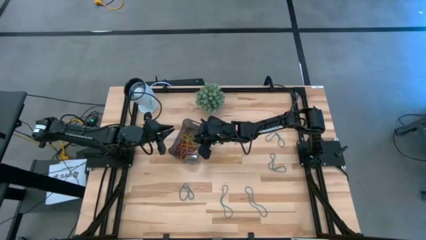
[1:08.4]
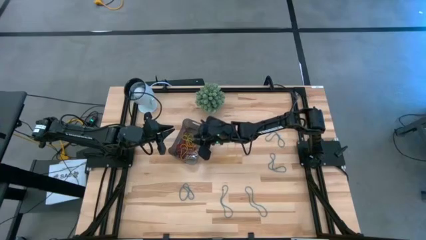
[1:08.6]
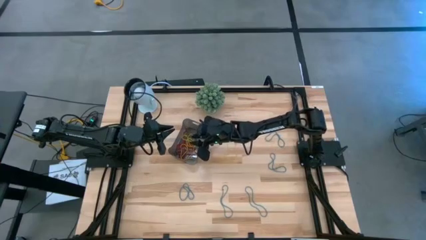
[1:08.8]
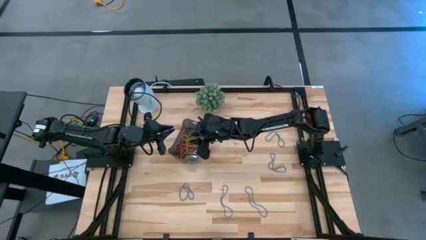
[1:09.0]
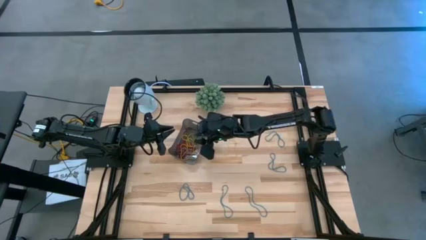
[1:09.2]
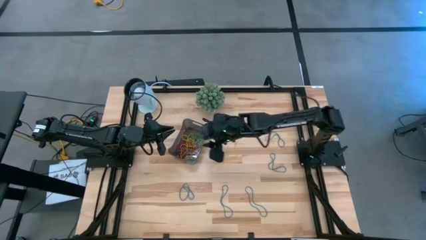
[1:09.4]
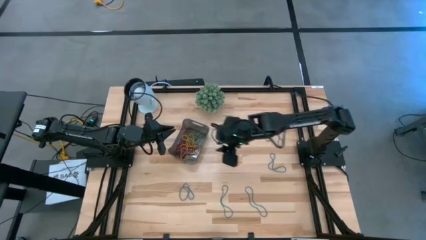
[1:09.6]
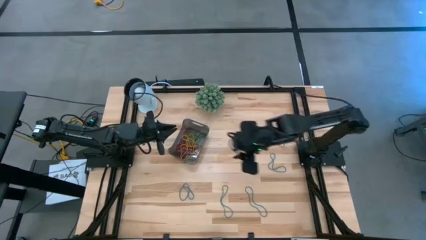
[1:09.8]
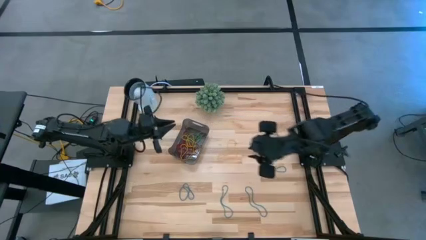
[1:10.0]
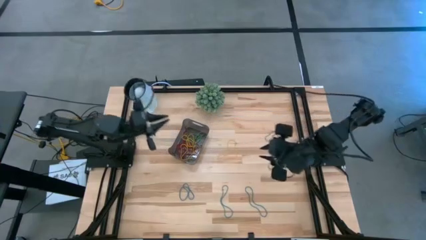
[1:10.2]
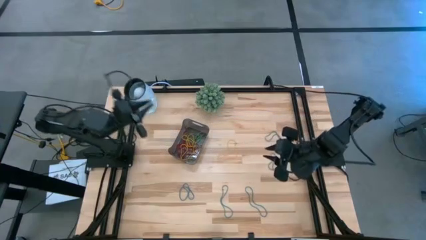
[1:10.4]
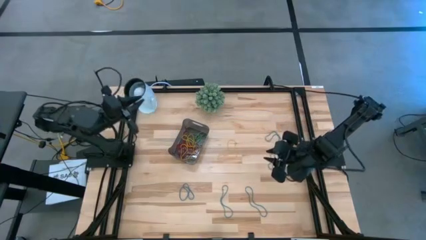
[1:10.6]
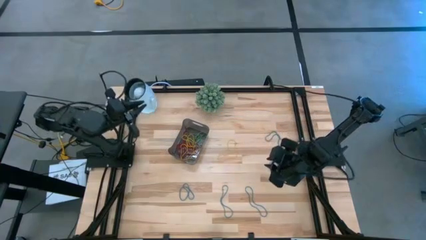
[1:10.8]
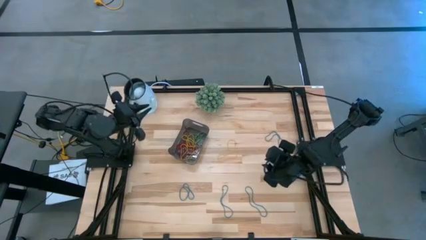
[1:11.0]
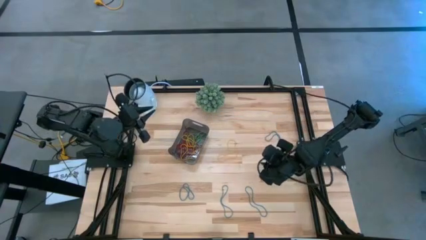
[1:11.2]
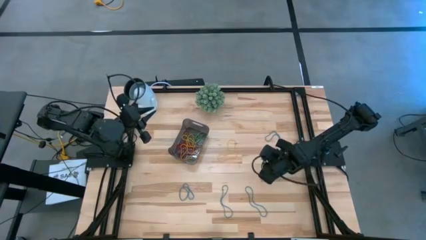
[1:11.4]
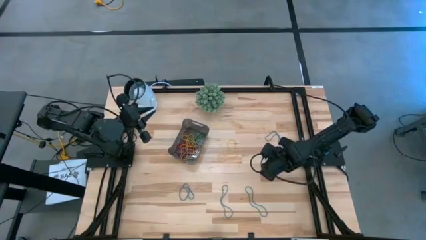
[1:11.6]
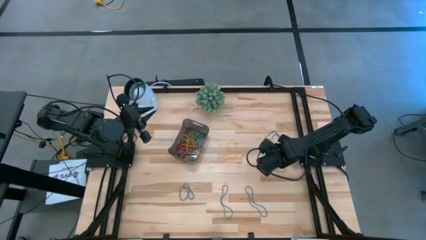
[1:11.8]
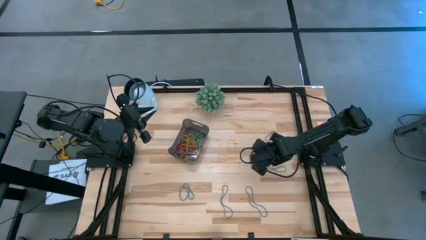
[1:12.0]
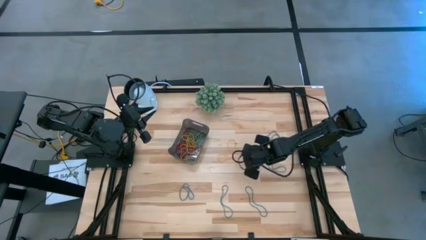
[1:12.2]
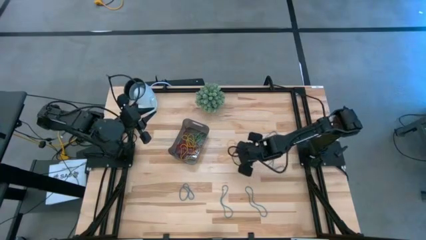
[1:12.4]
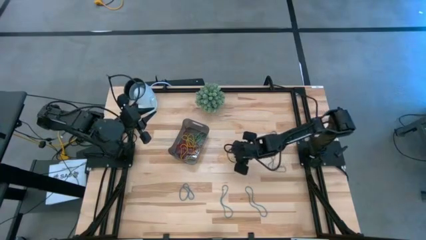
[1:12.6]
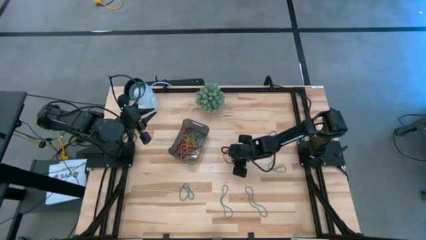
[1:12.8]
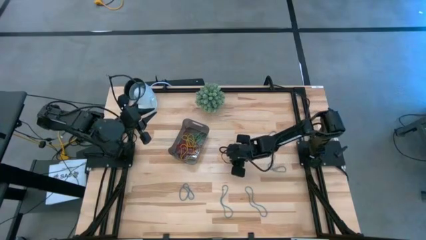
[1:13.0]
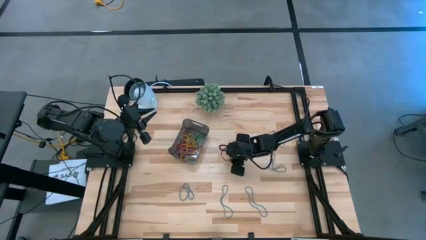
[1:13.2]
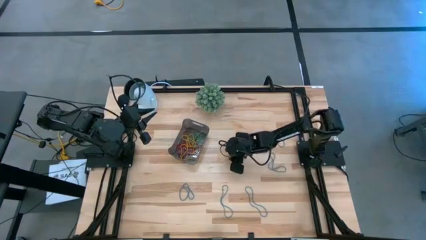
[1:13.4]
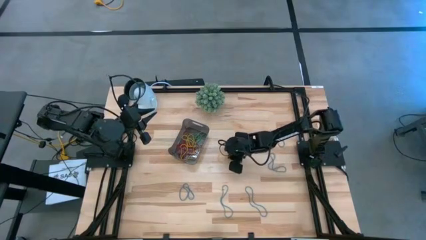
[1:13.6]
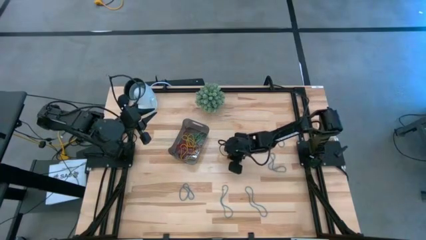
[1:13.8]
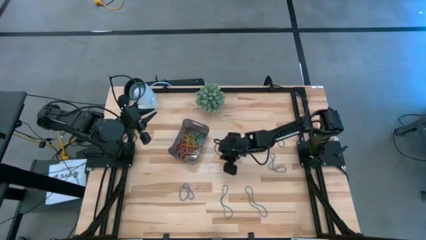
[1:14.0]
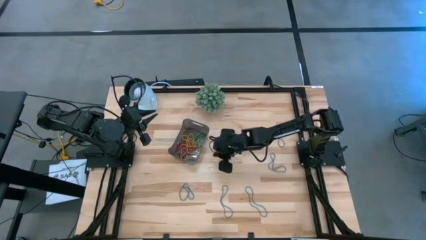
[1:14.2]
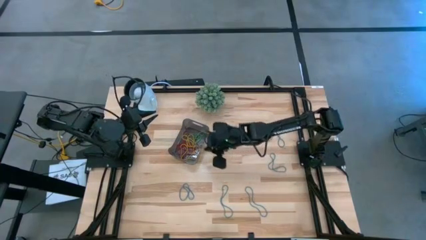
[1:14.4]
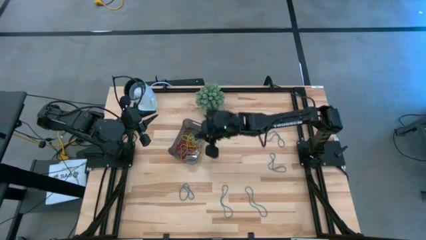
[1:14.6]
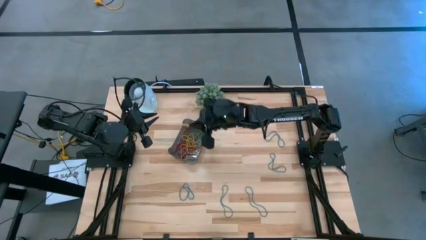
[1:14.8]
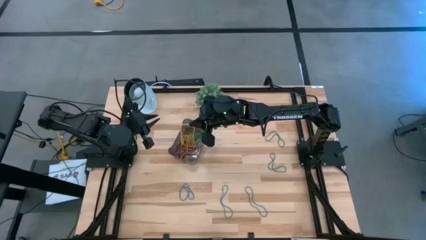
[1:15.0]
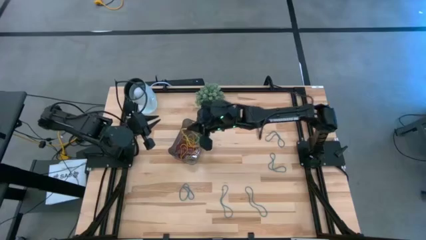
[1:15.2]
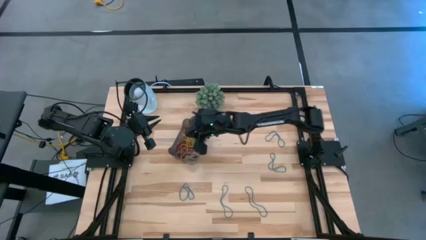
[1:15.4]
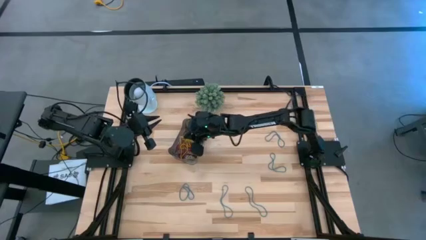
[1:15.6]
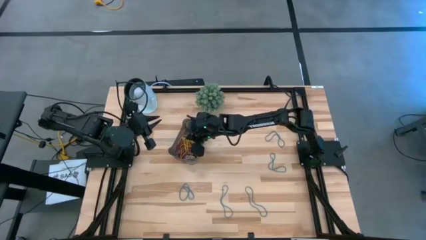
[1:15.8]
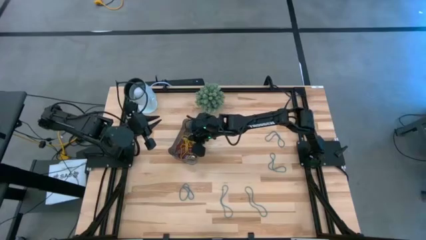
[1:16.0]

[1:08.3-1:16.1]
Task: Pick and place items into bin
Put the yellow rubber band into the black bin

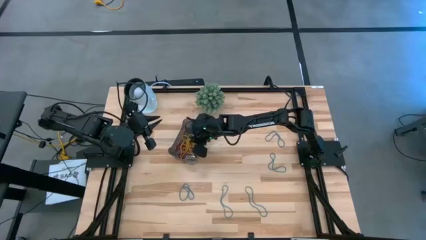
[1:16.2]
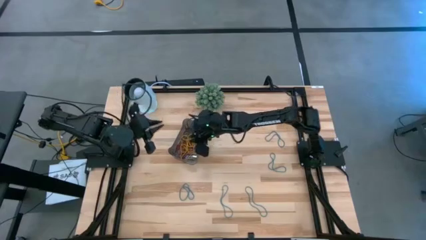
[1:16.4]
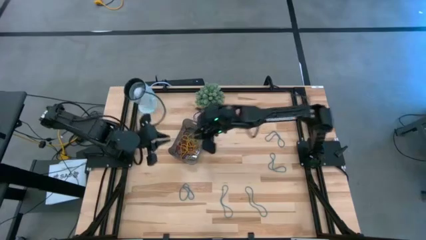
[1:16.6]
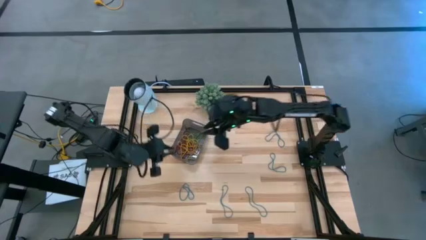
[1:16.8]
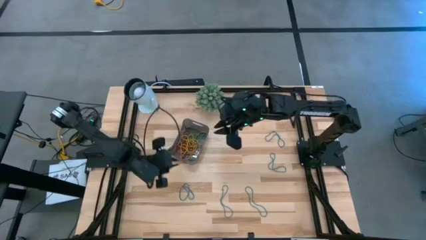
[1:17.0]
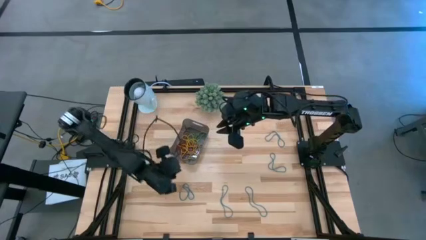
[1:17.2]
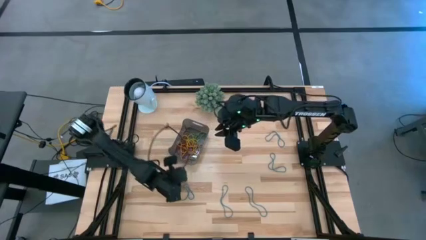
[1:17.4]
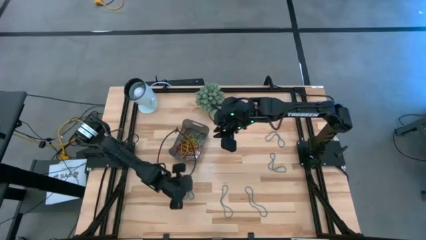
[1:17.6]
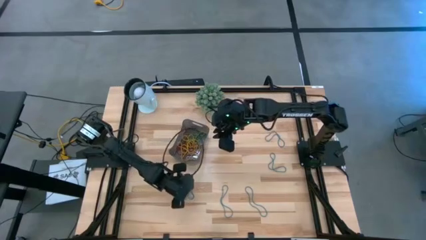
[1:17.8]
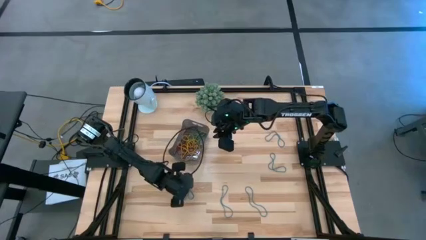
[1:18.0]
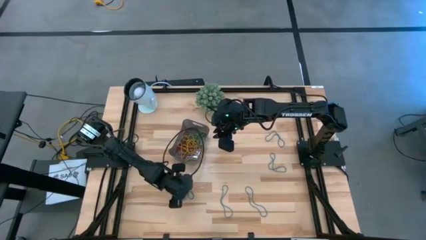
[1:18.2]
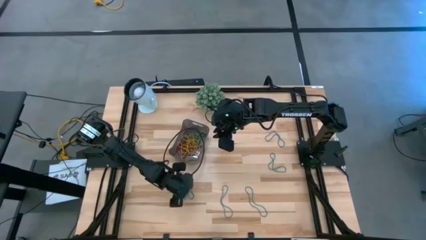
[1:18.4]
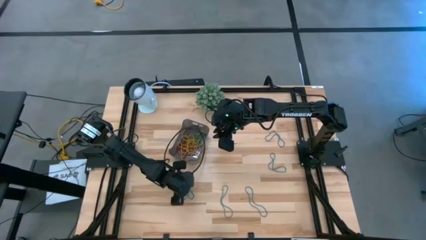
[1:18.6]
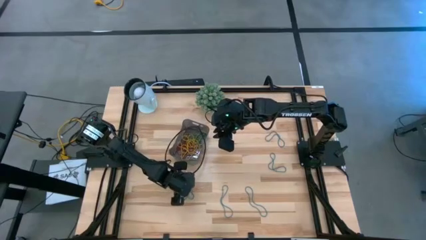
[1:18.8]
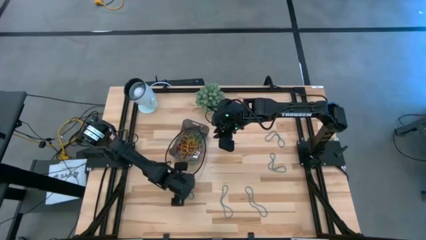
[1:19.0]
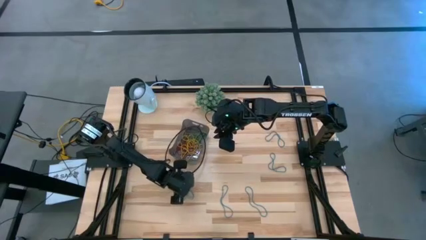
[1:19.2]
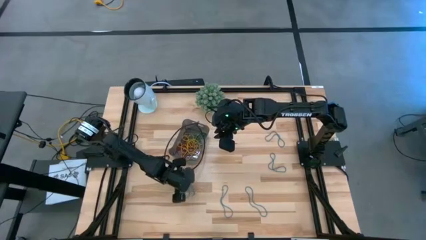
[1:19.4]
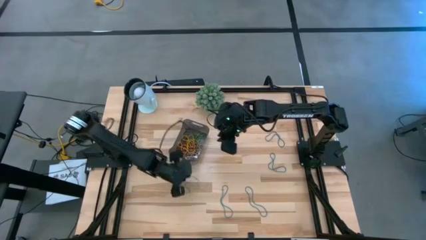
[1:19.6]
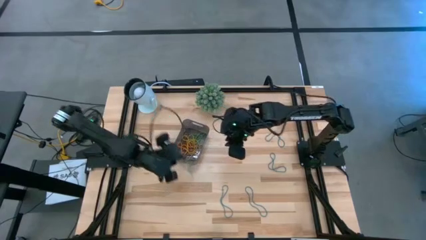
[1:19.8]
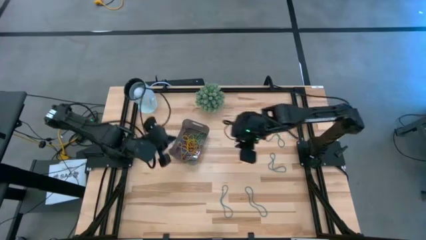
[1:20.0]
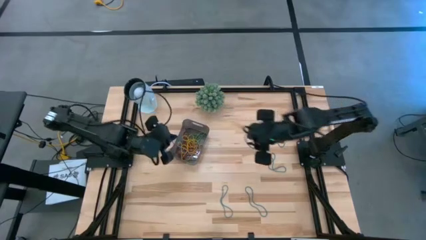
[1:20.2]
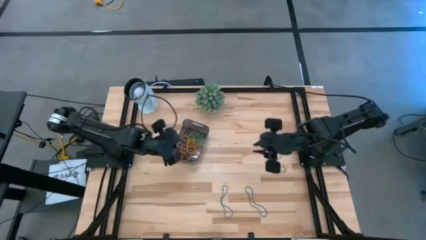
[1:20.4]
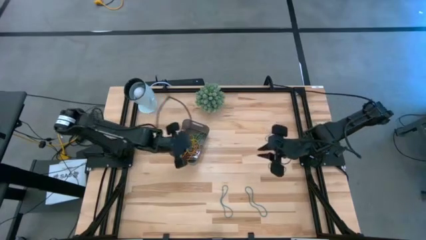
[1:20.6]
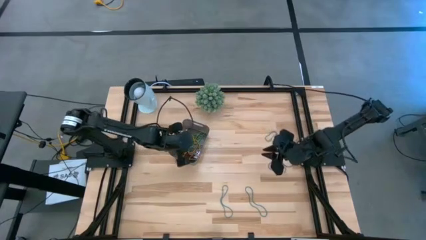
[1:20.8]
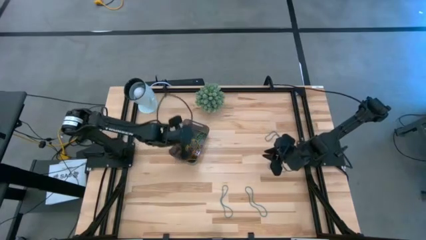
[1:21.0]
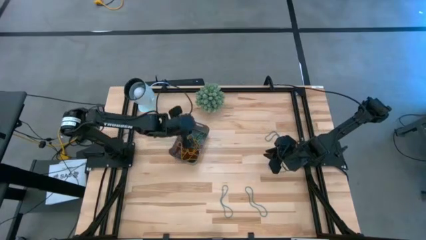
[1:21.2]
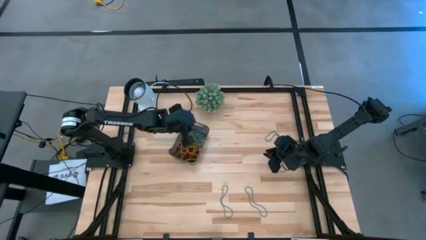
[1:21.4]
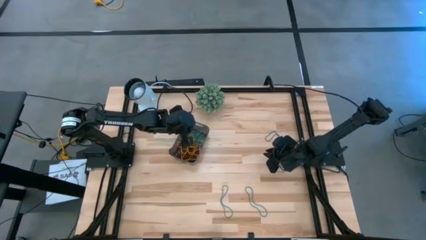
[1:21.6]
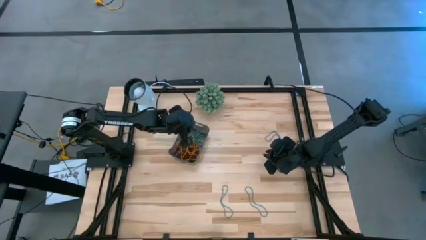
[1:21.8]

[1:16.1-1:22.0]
Put the blue rubber band into the black bin

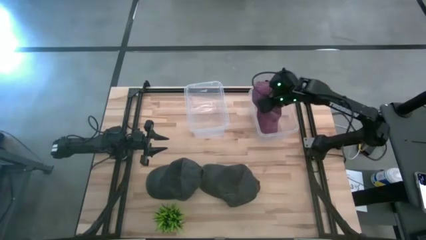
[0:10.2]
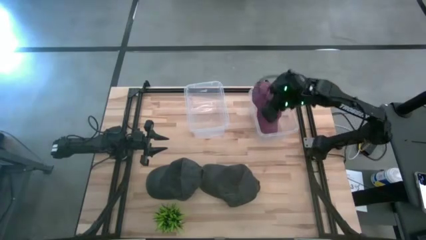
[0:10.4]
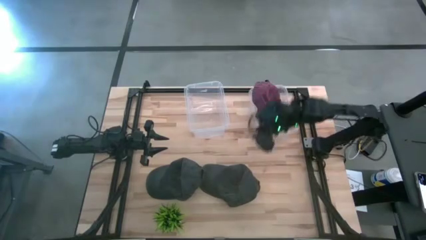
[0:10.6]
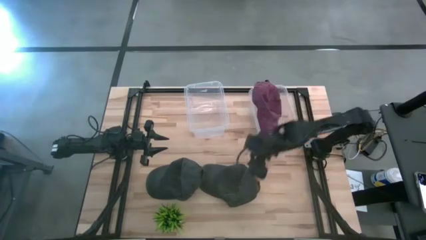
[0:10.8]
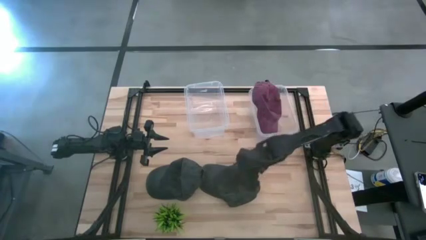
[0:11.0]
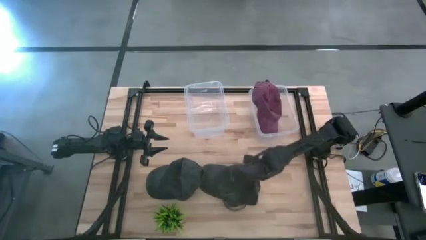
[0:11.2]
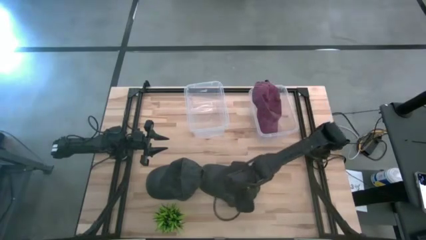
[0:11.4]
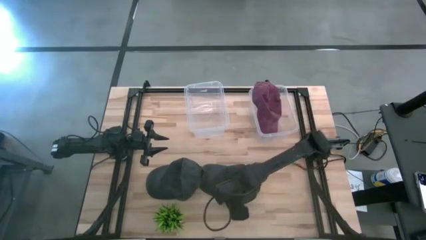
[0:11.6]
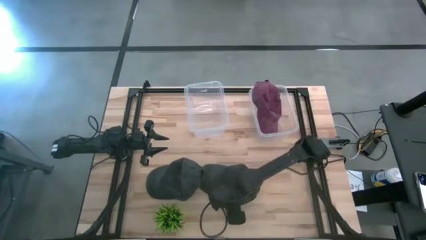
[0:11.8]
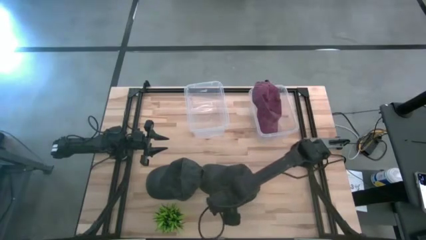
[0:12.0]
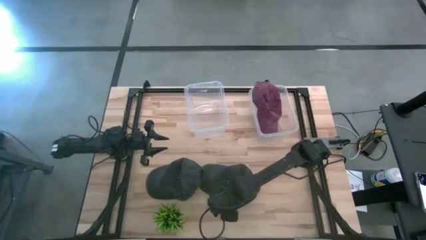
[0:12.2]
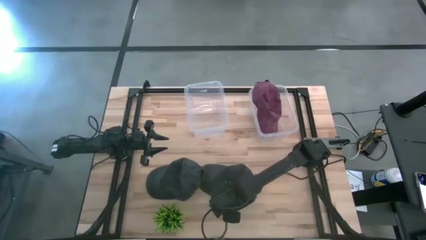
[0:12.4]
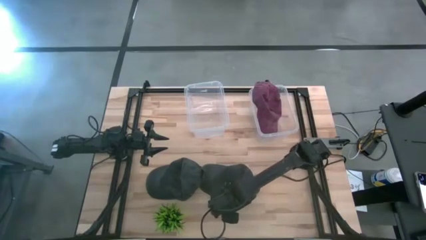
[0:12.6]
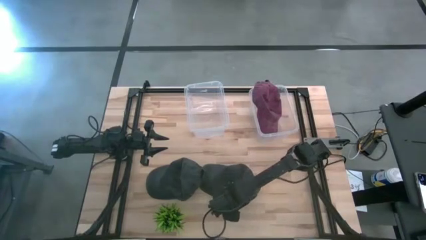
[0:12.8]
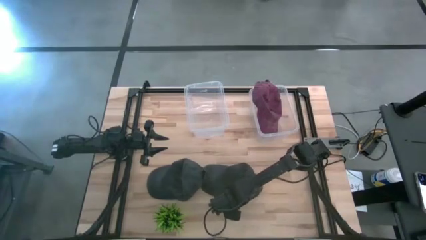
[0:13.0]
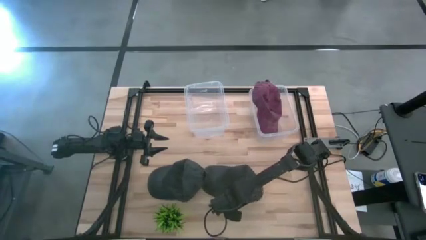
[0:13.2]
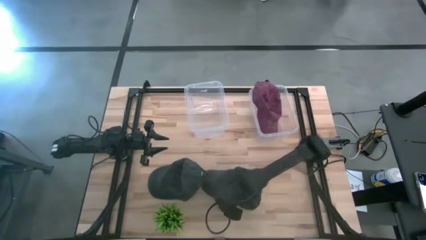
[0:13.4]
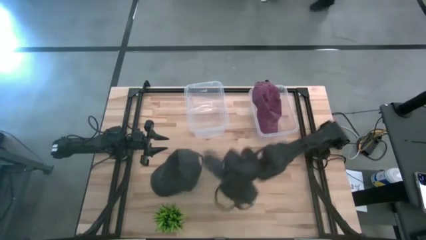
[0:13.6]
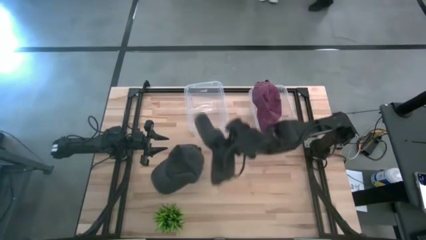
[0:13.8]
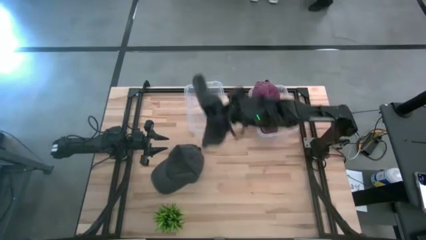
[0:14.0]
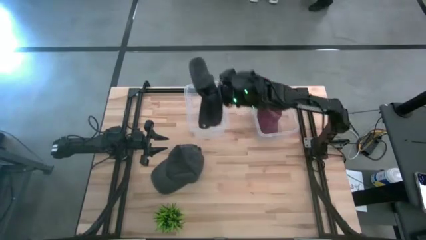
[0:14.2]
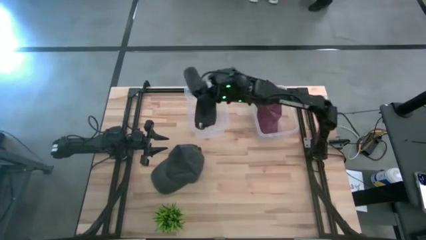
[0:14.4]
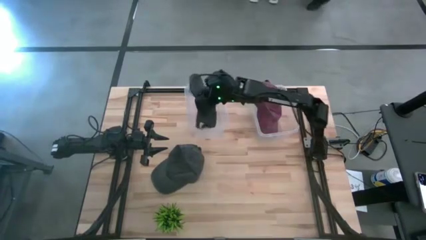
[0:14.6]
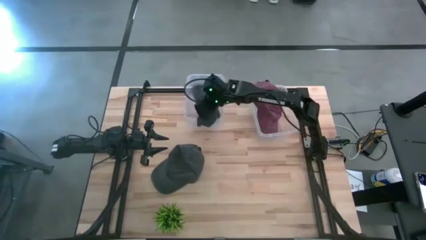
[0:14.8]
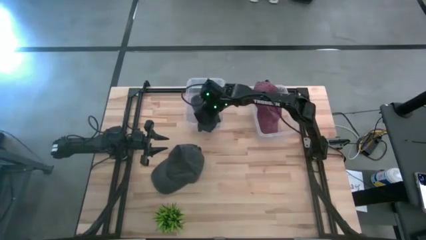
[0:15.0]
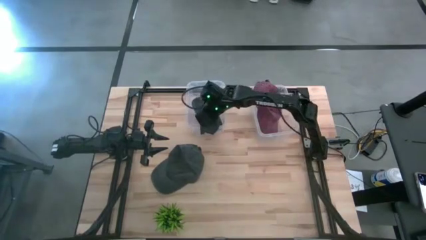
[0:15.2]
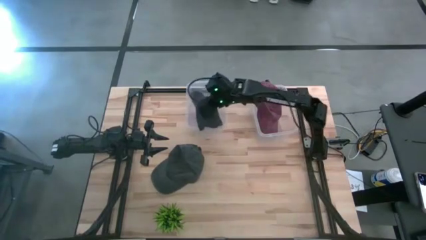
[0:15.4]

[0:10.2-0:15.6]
Task: Pick & Place hat
Put the black cap into the left transparent bin
